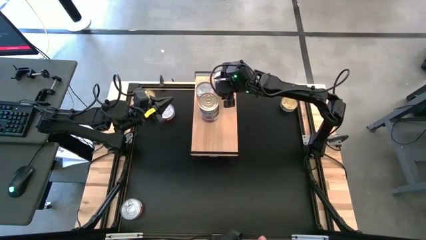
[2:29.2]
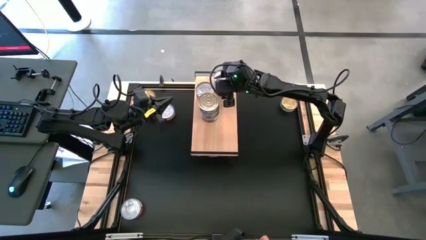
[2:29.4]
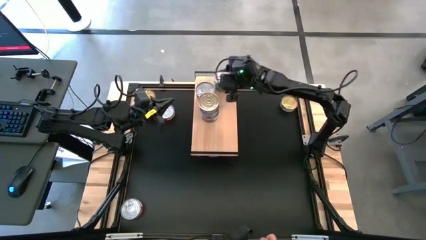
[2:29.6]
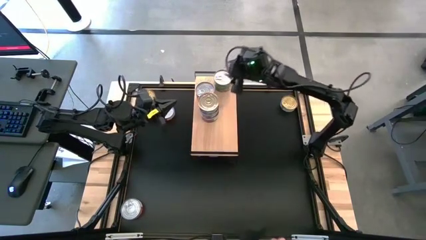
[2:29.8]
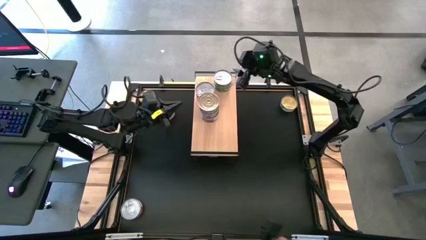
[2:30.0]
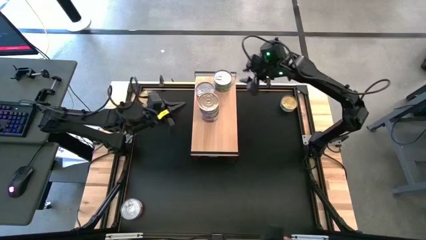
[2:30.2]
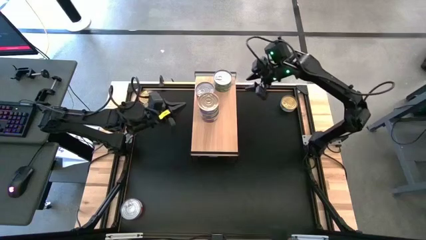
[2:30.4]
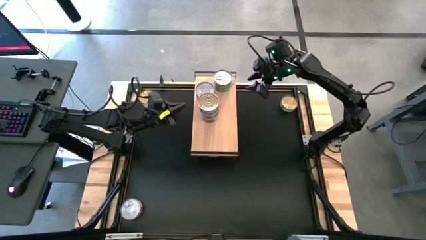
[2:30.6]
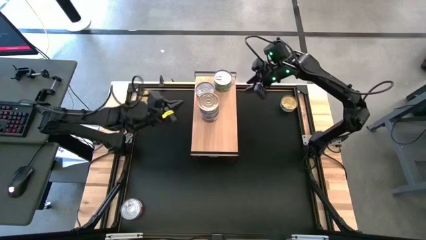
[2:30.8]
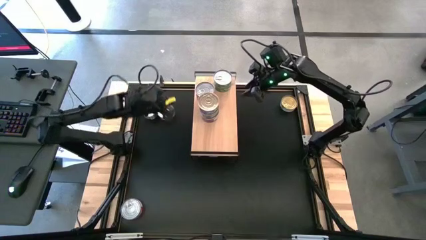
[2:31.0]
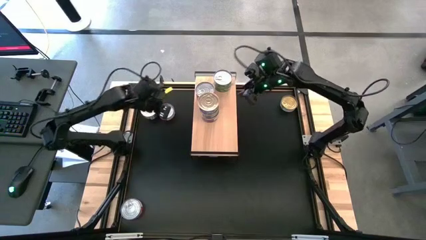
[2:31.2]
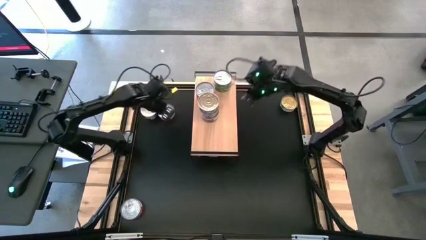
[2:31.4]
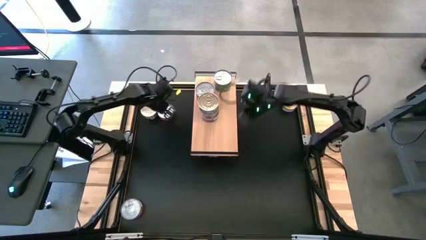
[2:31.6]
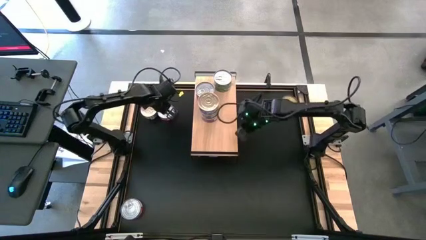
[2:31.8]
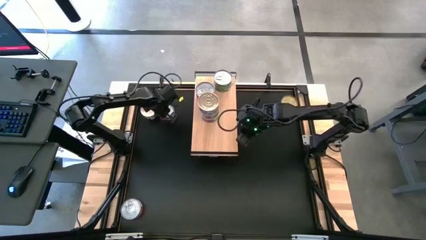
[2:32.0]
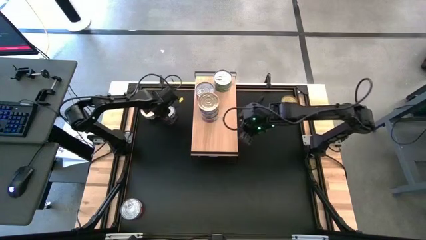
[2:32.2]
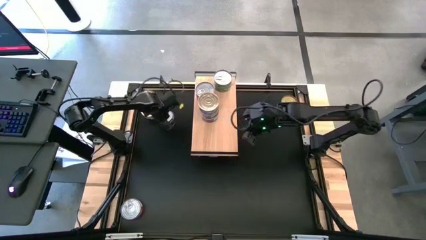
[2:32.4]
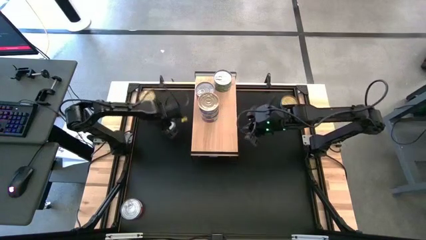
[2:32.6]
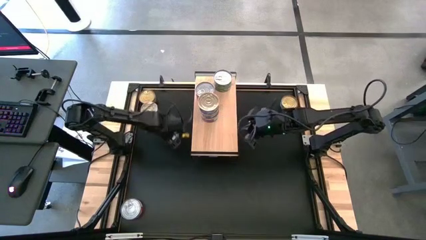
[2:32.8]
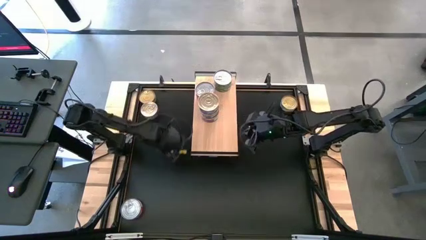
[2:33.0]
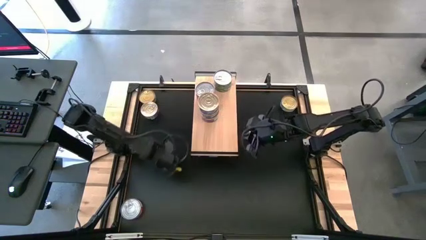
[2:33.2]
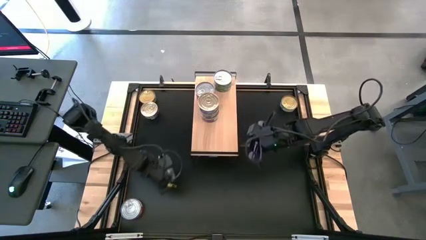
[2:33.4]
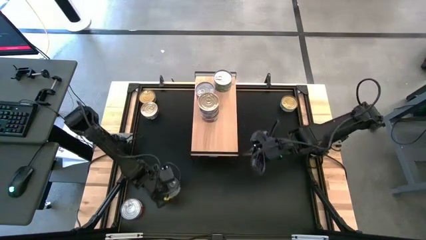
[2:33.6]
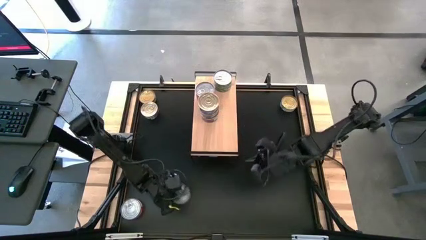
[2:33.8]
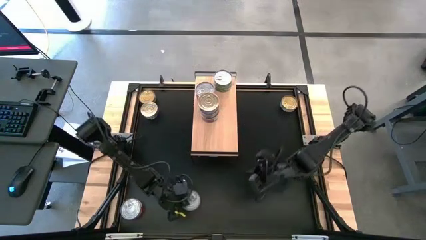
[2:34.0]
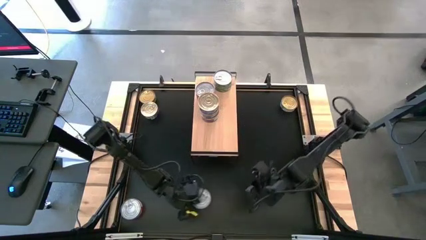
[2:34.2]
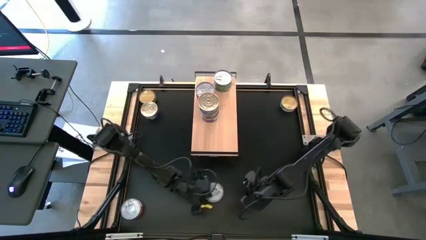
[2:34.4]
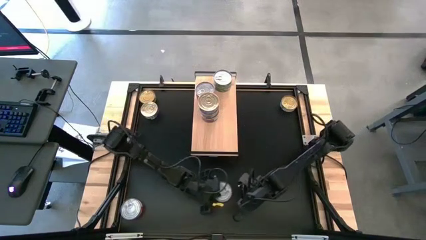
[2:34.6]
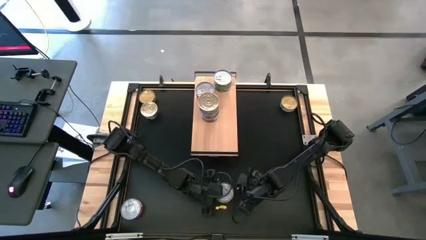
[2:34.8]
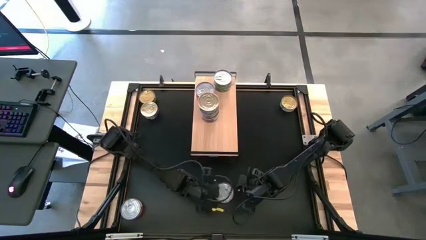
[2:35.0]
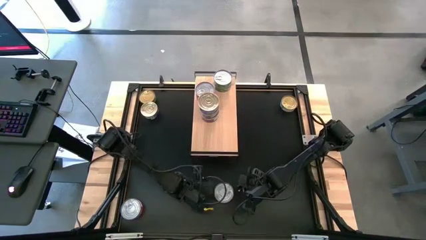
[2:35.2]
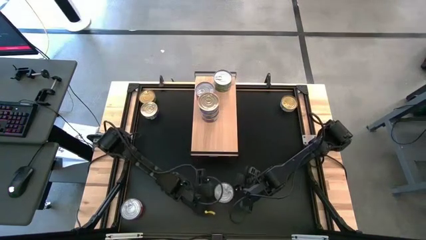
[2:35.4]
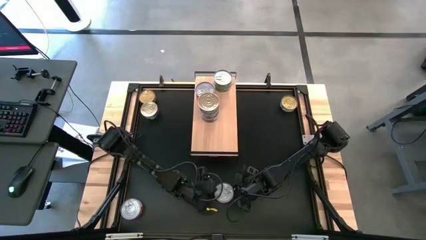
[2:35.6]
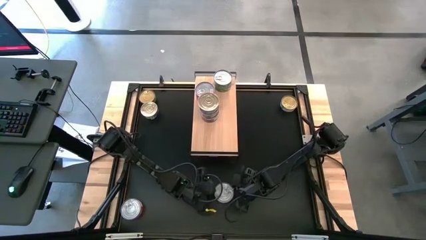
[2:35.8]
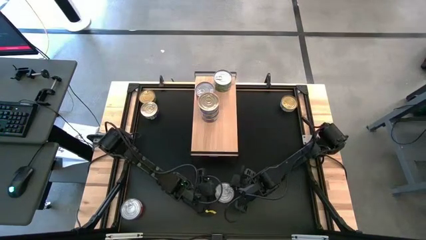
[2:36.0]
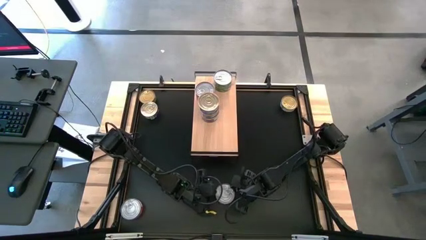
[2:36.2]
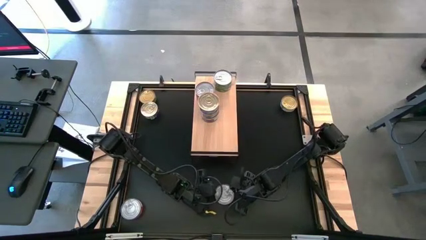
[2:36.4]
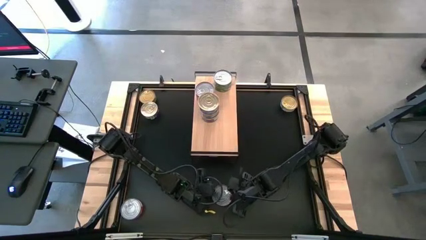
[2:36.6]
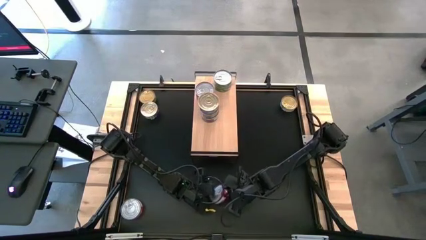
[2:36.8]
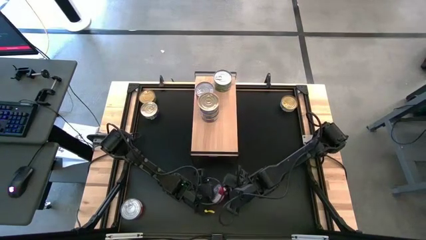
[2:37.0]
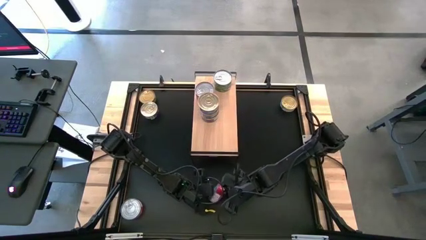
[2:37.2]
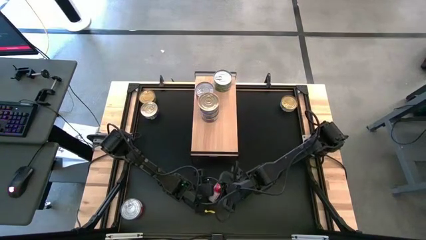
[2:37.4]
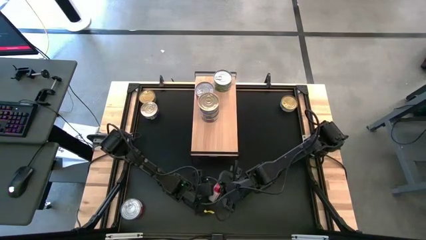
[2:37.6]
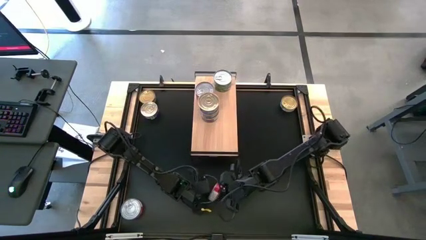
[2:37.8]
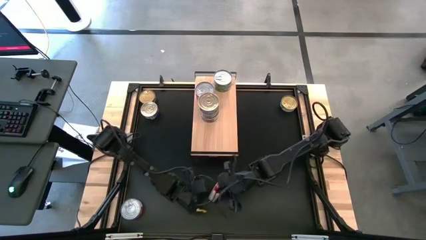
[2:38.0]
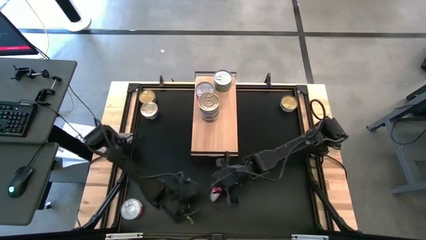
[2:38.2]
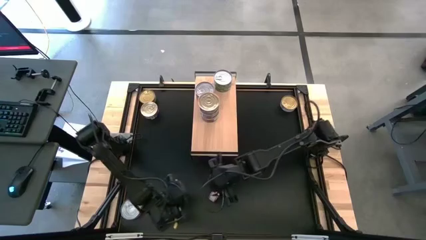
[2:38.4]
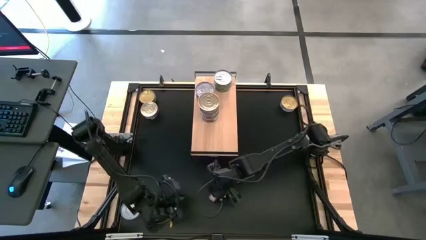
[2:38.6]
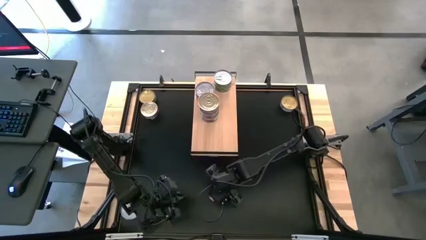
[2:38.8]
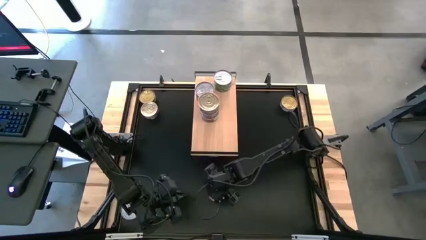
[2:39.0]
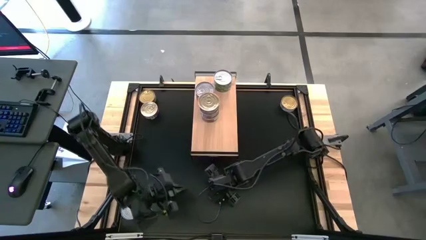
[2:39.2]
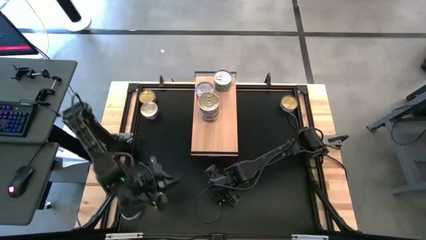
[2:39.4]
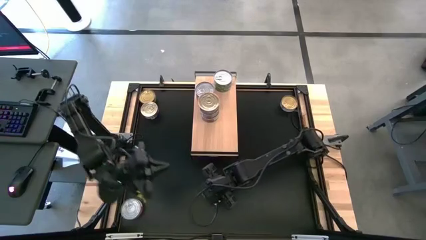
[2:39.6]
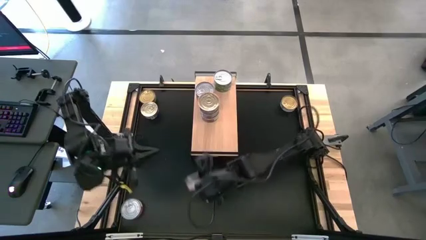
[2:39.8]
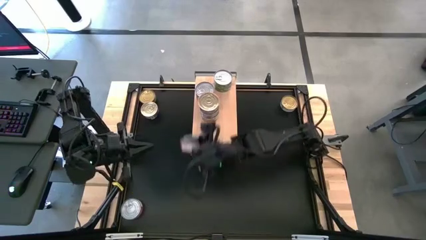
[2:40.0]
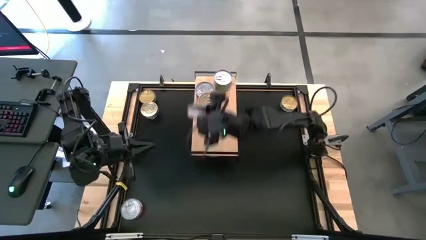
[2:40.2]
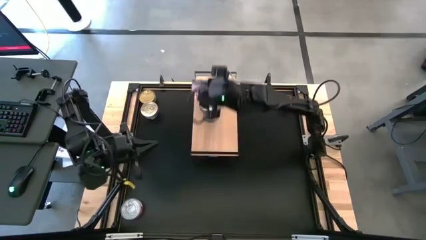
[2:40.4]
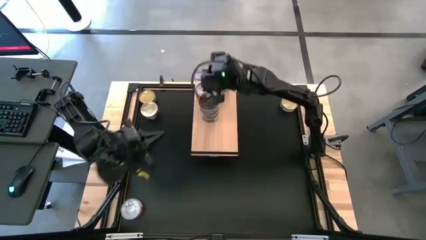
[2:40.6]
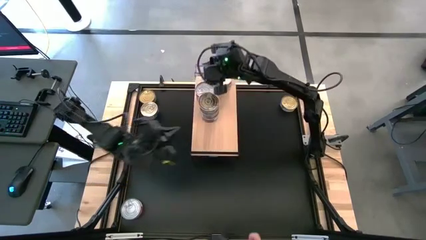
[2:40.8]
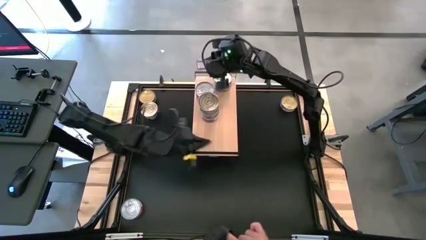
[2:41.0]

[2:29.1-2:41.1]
Task: Stack canned seafood by type on shelf
Stack the red tuna can on top of the red tuna can on the shelf

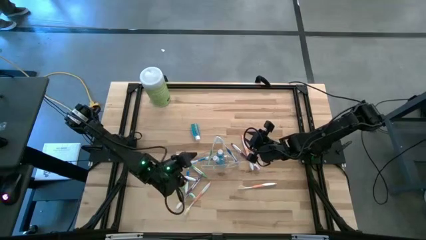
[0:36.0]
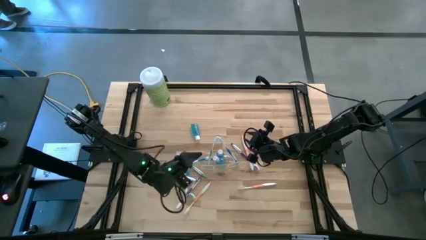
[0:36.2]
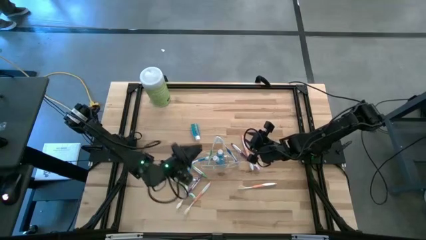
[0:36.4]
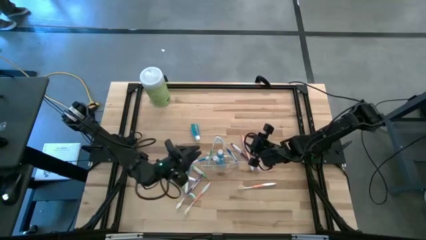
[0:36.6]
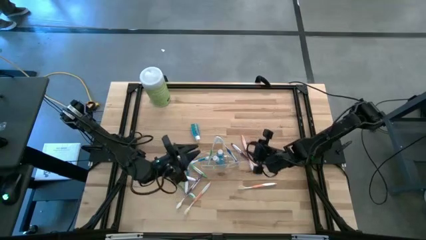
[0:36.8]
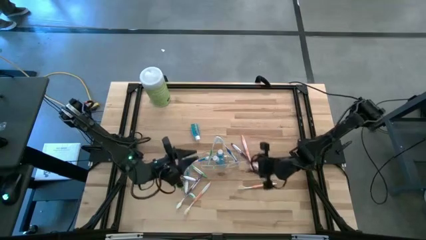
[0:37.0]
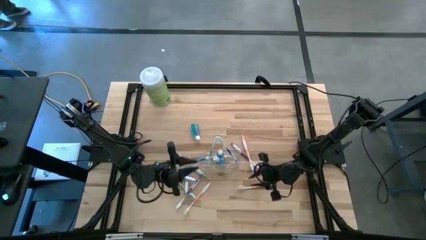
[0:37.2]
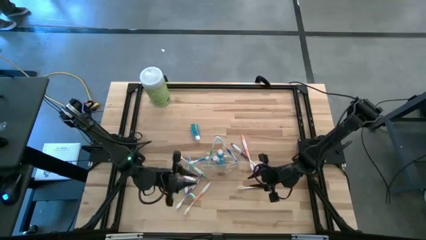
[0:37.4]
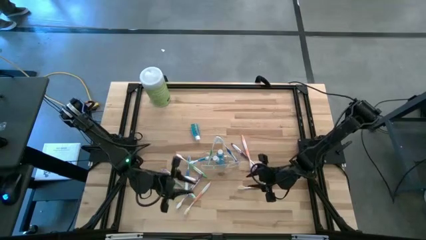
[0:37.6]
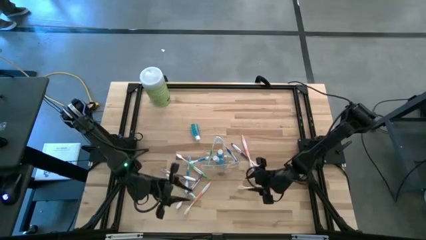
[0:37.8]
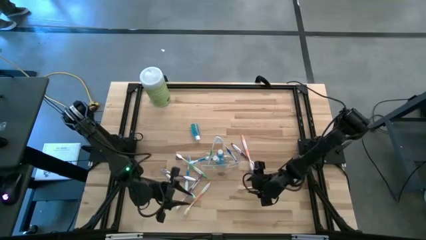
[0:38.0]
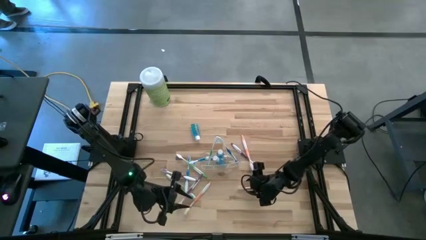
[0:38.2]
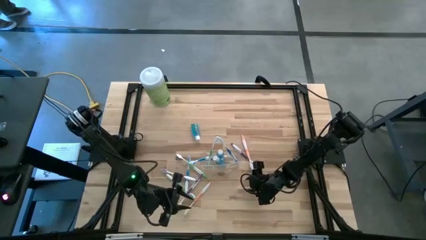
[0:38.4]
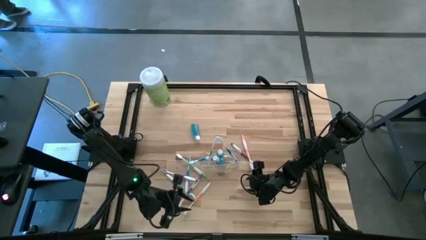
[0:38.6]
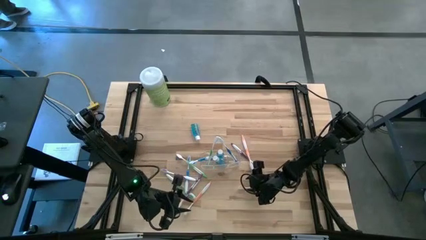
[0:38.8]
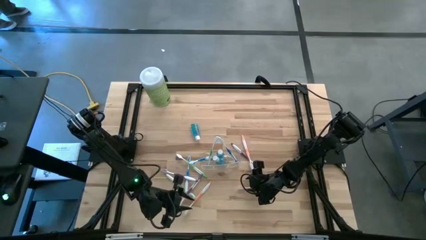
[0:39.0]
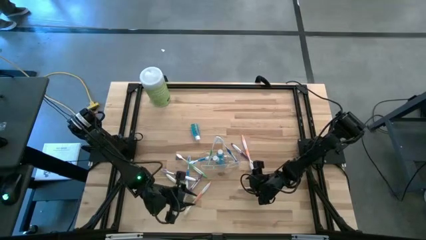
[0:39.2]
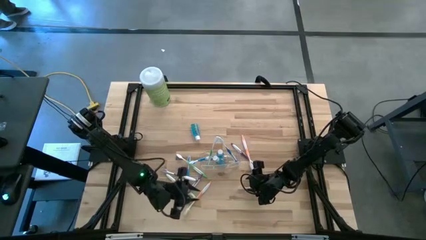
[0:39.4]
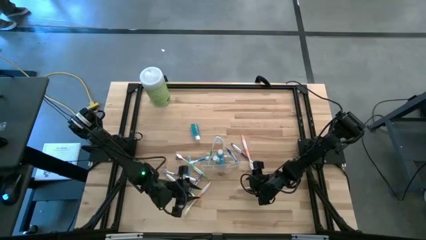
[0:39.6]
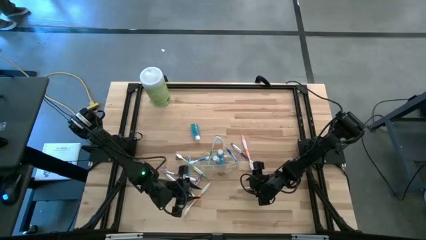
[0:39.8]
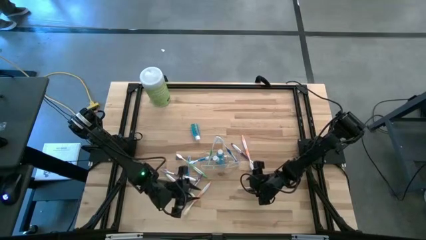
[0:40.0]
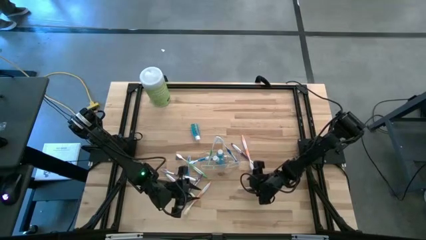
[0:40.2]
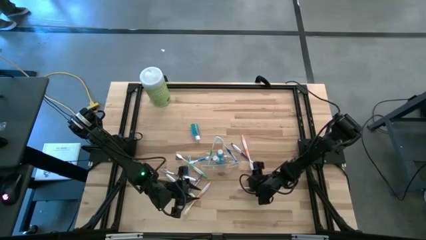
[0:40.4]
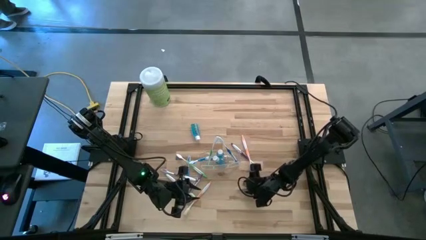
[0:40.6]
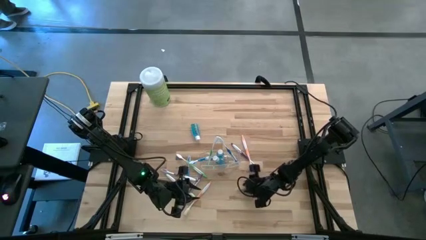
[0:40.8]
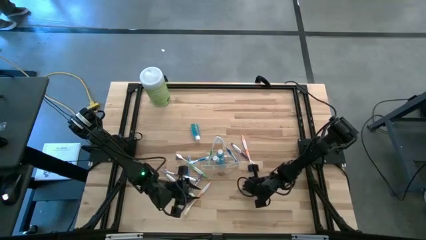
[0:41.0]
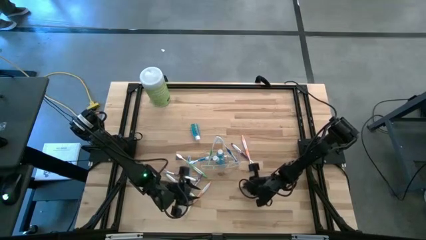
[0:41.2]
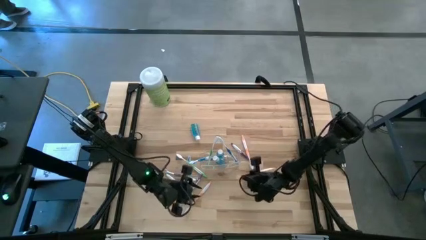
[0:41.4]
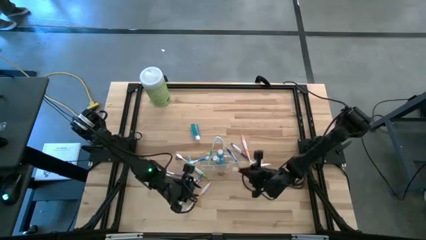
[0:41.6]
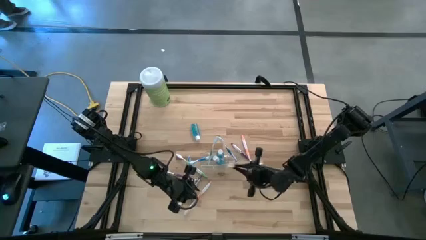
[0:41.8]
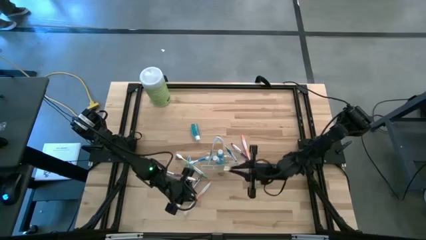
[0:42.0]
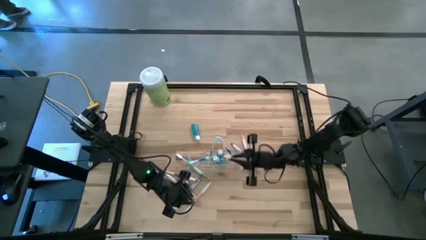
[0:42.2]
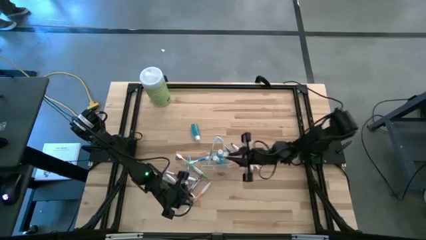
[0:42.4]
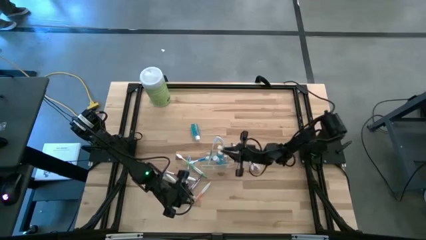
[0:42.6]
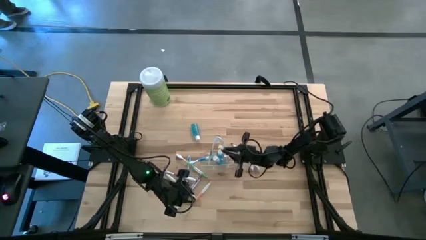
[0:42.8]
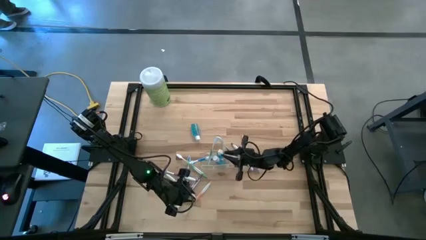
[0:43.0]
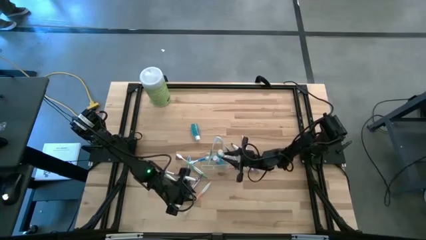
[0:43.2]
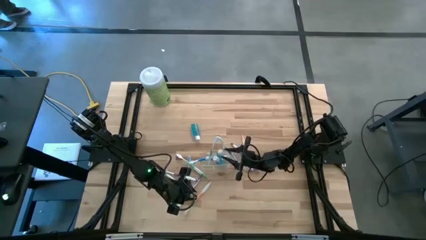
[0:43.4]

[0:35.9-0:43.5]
Task: Pick & Place toothbrushing station
Put the bottom right orange toothbrush into the transparent organizer
